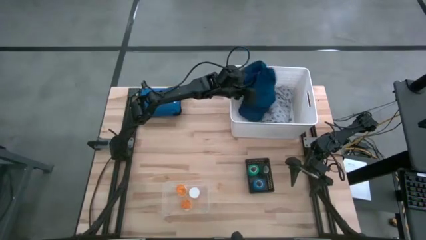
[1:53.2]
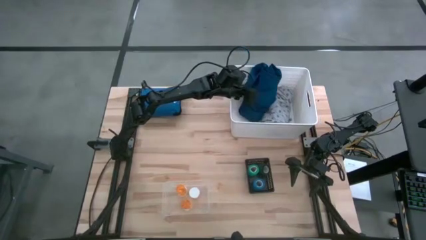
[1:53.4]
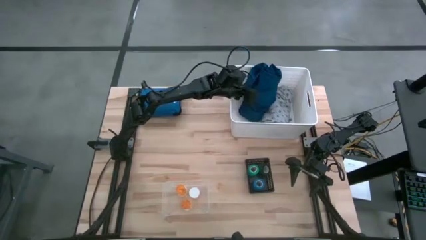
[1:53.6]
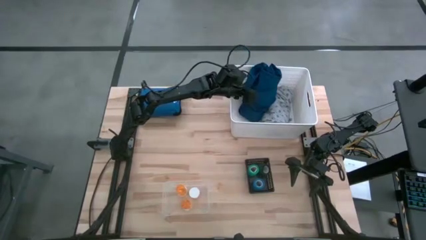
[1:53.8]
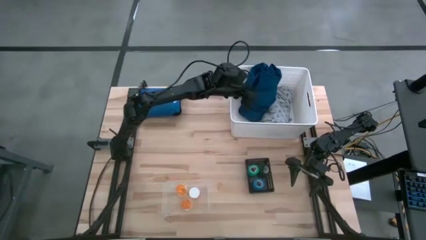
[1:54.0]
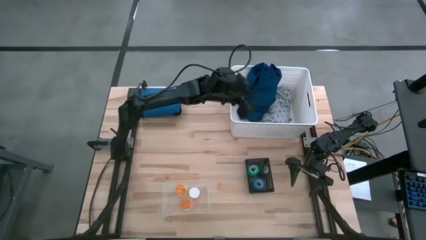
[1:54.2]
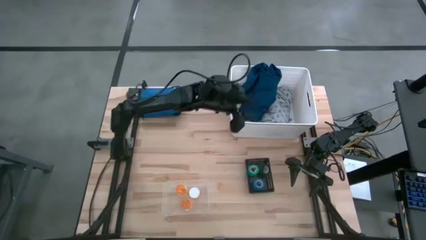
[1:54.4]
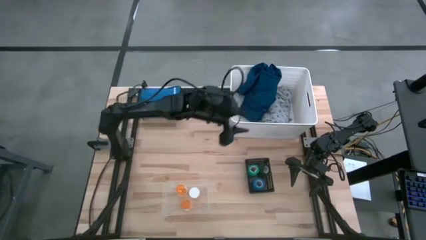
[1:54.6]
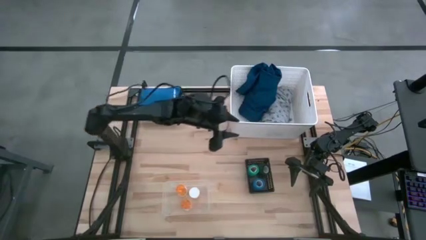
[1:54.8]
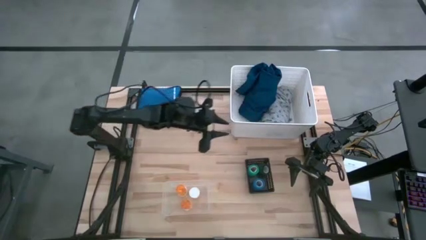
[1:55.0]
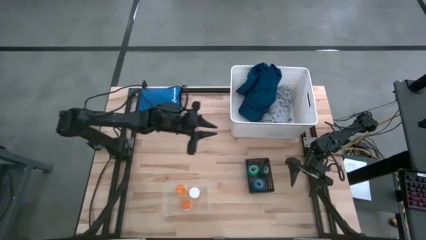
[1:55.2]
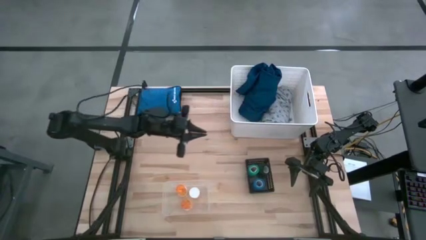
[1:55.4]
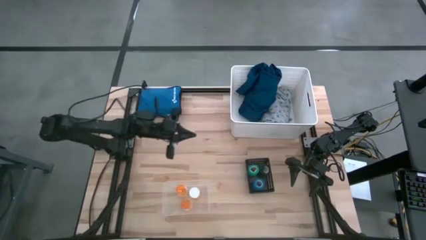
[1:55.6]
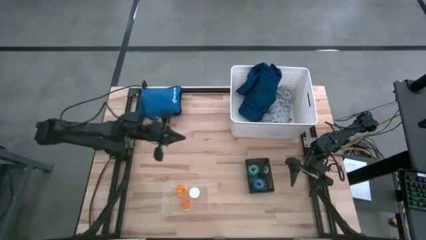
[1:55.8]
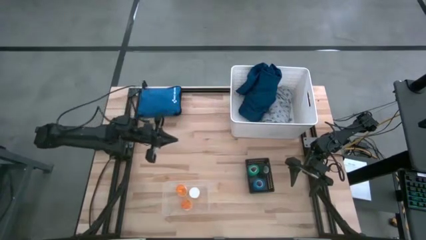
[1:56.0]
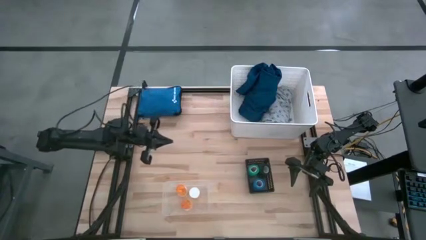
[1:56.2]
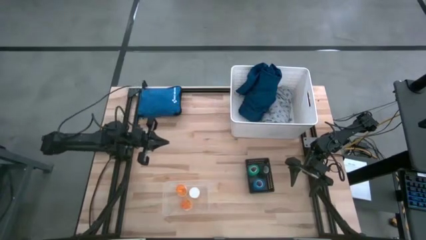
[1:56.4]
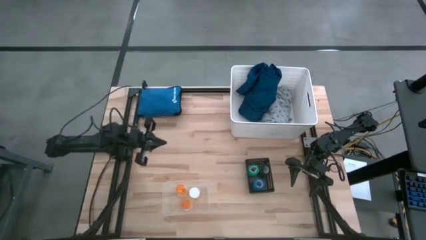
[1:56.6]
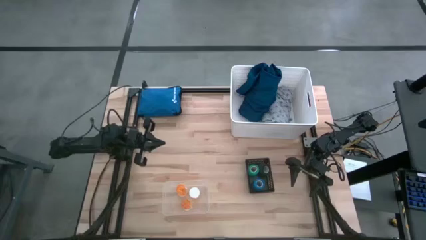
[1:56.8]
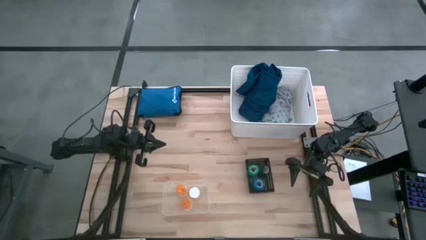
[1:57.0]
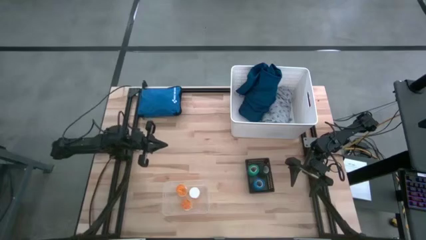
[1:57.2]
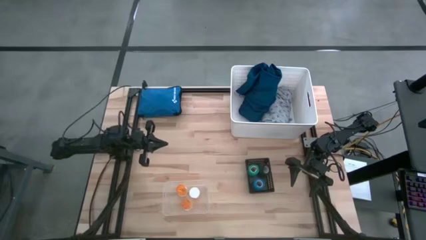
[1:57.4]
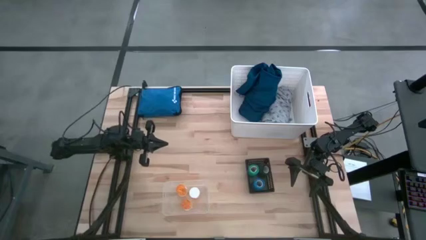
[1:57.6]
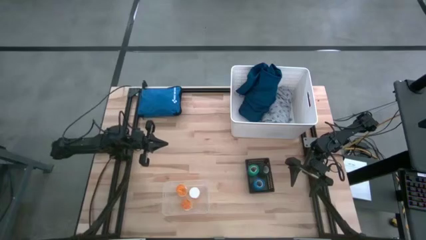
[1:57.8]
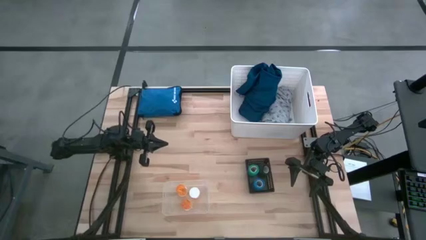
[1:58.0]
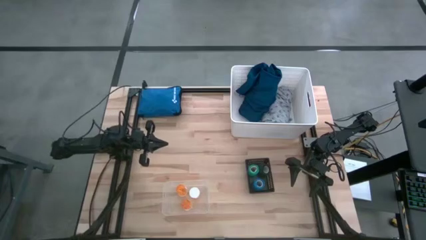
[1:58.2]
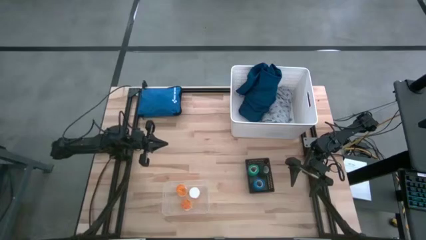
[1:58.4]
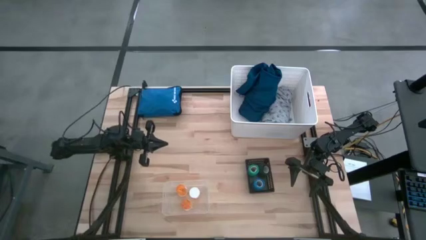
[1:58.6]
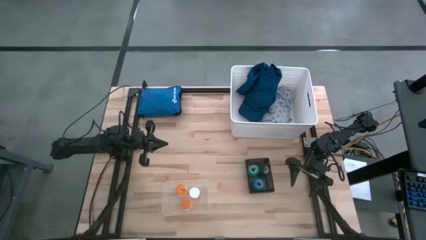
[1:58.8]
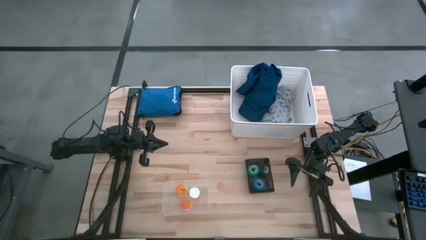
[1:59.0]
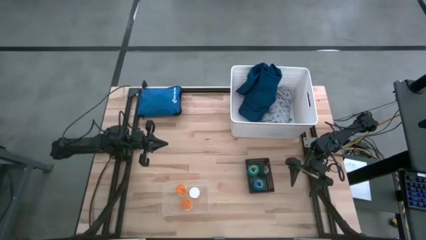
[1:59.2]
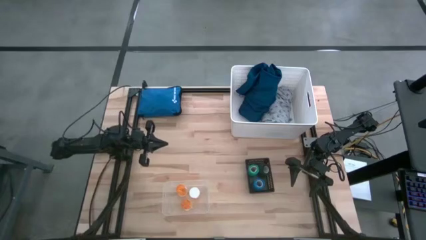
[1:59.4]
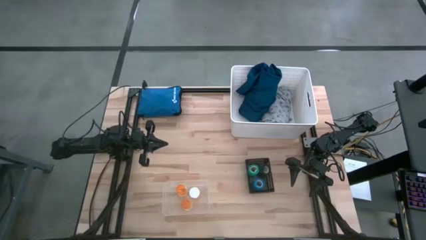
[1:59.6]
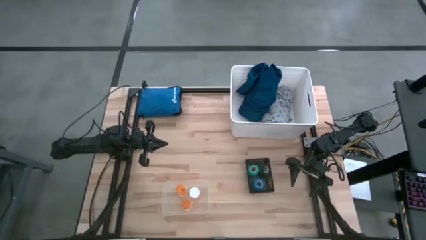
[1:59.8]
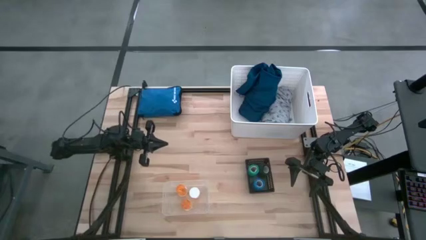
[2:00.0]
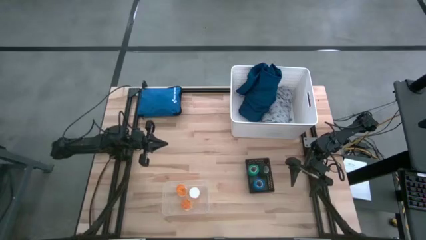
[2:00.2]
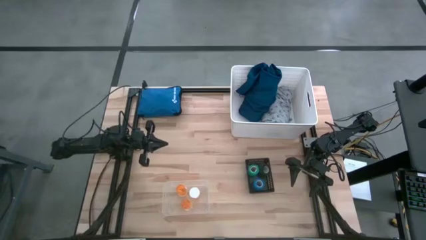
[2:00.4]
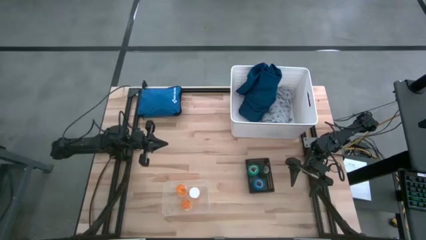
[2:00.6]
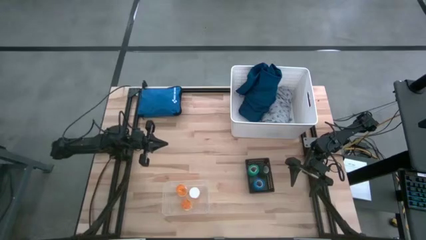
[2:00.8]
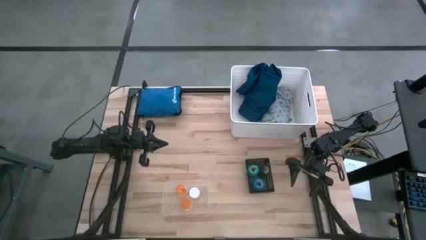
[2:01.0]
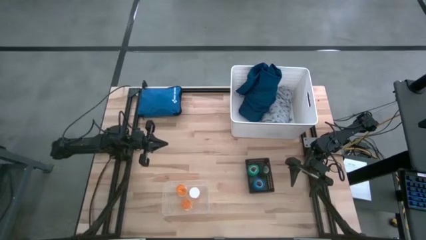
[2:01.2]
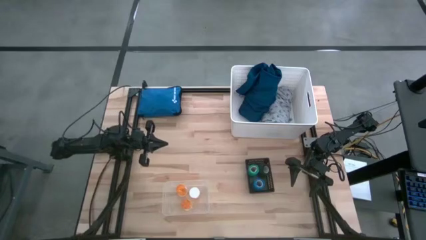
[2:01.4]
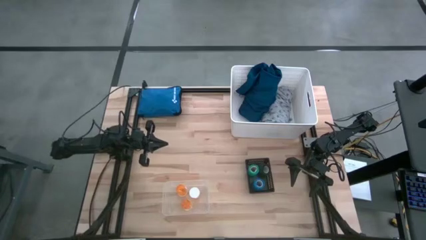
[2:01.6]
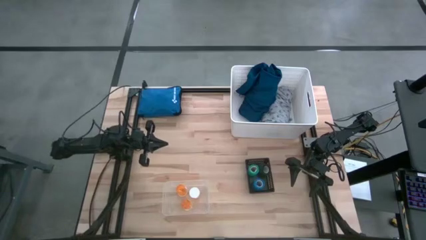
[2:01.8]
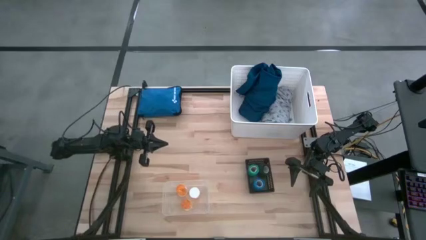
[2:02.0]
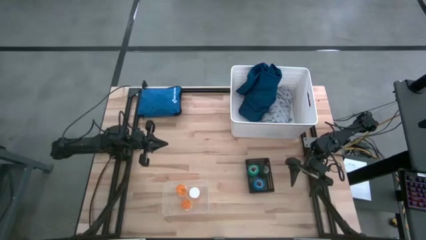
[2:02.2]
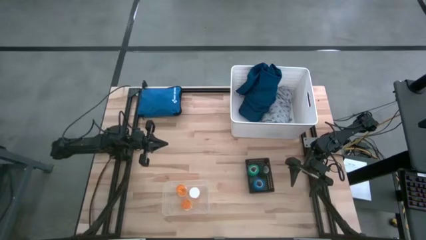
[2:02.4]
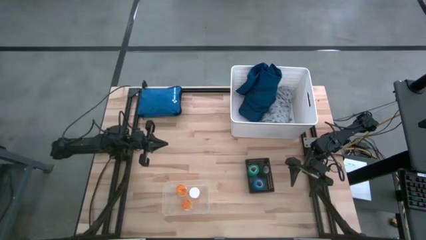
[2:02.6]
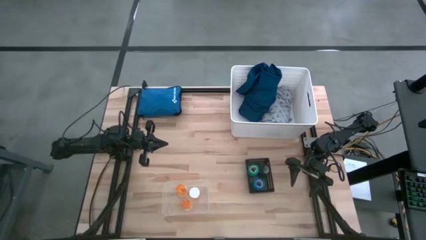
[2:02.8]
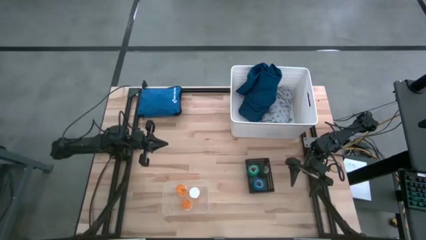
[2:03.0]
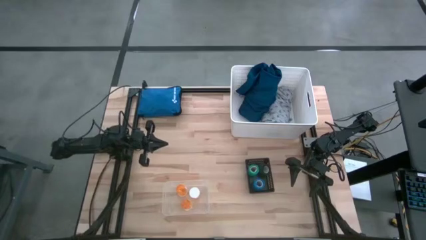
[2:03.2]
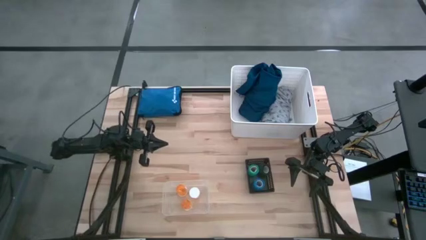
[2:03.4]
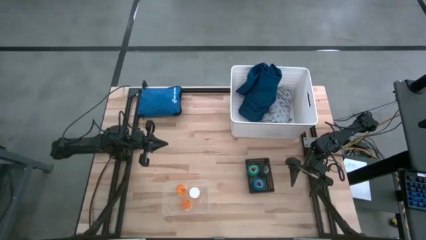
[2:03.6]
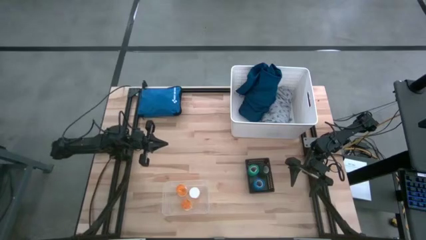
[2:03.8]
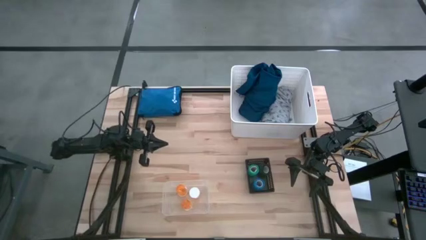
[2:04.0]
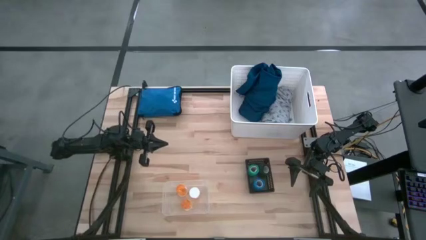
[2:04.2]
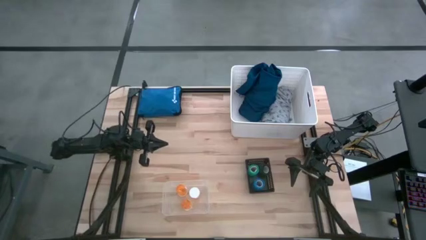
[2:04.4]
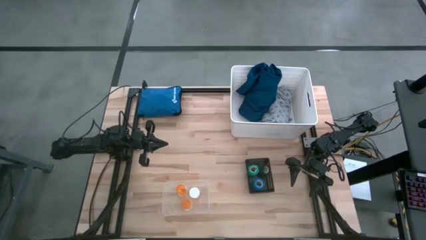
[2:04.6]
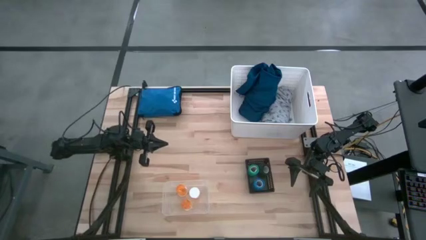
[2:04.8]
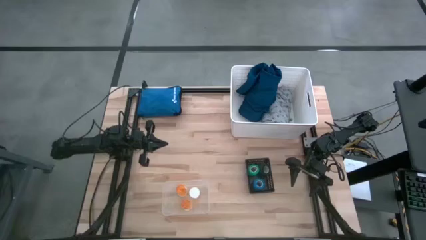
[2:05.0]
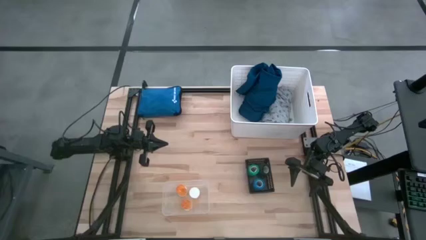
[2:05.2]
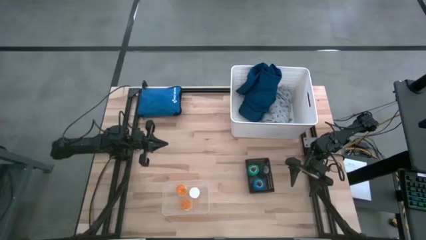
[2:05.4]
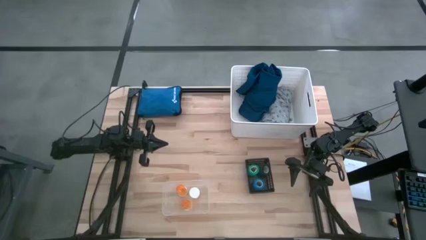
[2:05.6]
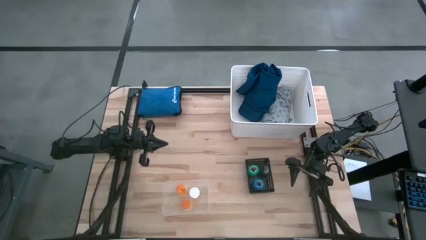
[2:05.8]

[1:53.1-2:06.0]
Task: Pick & place medical supplies in basket/bin
Return to Home Position

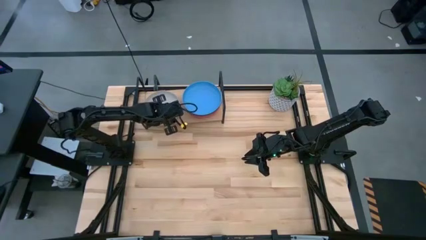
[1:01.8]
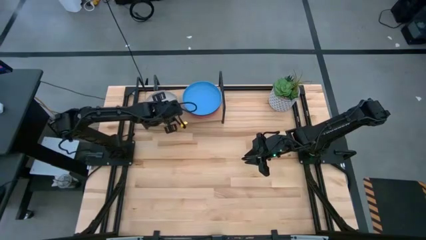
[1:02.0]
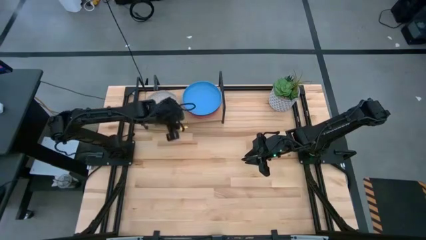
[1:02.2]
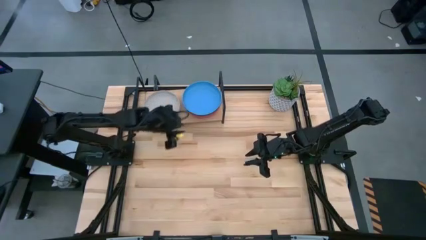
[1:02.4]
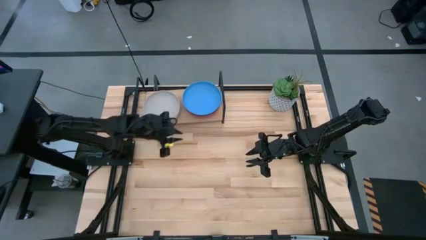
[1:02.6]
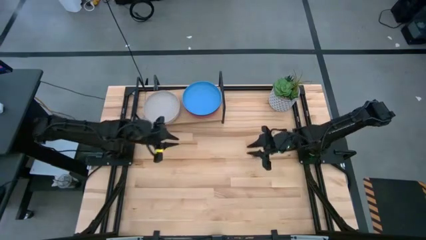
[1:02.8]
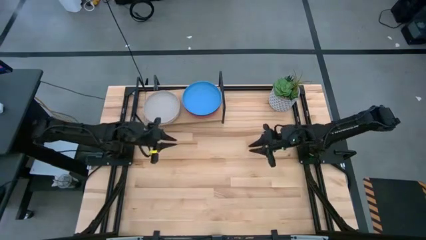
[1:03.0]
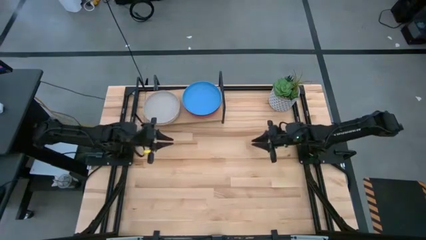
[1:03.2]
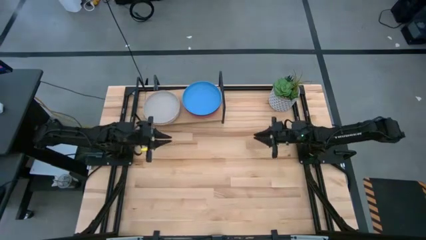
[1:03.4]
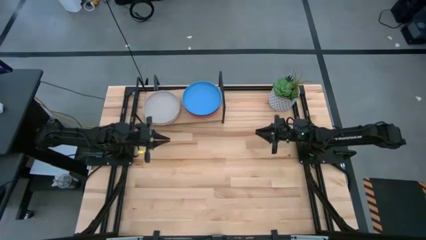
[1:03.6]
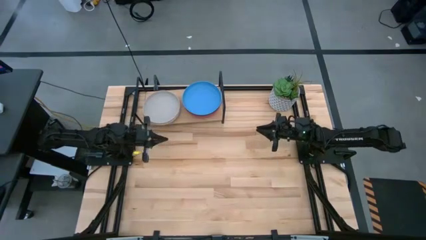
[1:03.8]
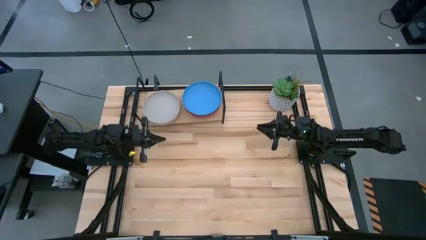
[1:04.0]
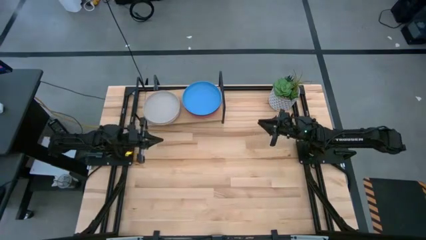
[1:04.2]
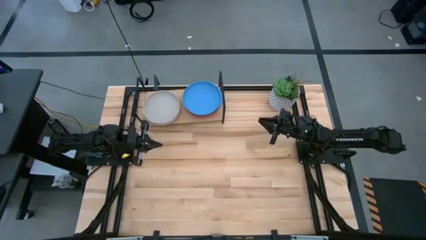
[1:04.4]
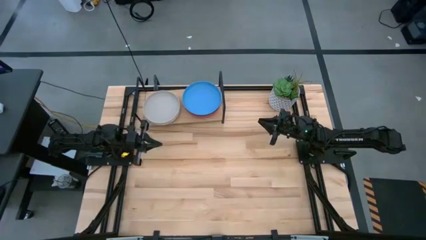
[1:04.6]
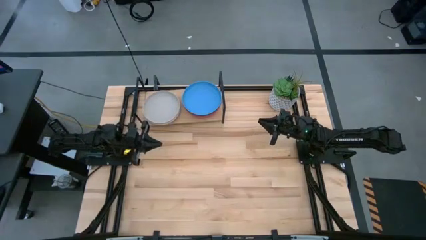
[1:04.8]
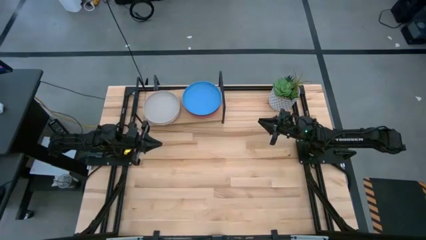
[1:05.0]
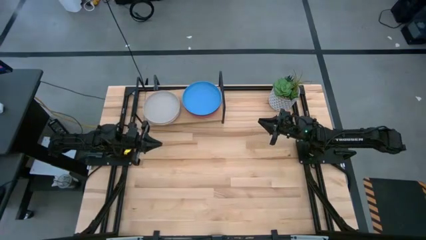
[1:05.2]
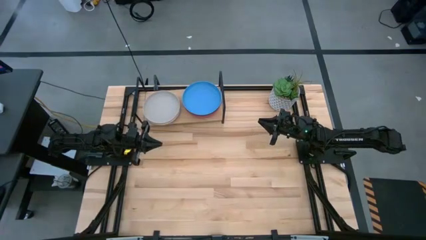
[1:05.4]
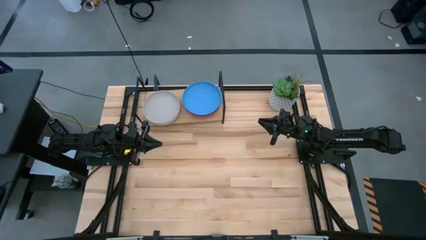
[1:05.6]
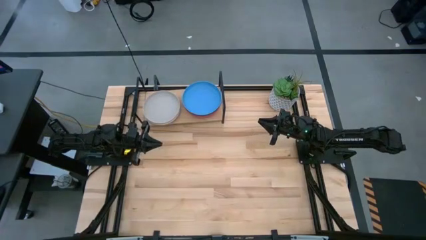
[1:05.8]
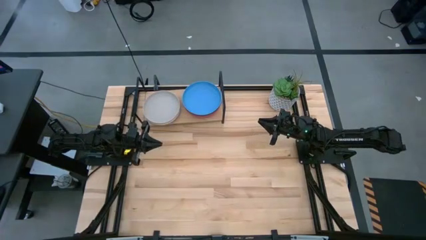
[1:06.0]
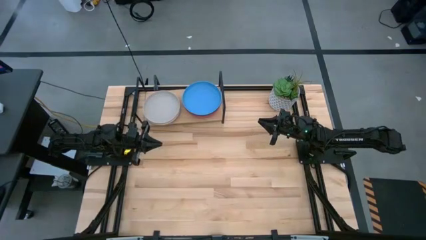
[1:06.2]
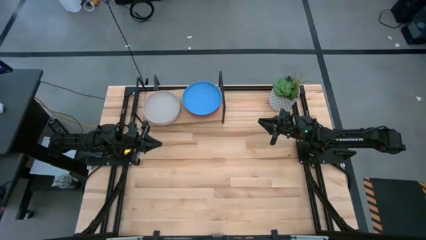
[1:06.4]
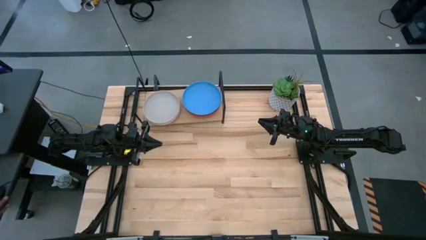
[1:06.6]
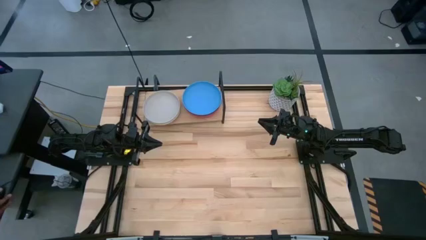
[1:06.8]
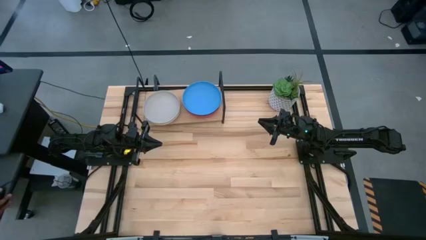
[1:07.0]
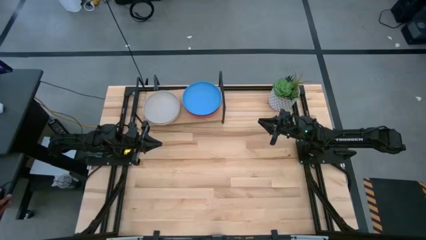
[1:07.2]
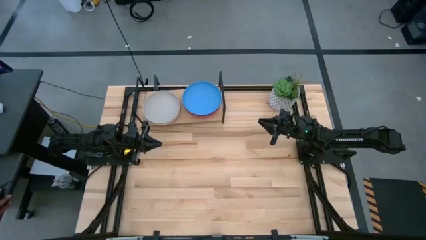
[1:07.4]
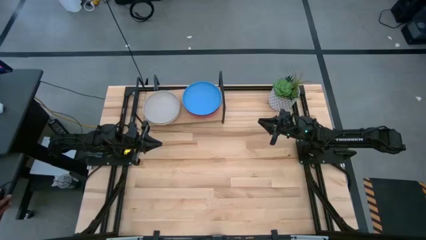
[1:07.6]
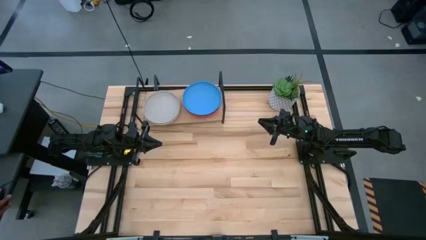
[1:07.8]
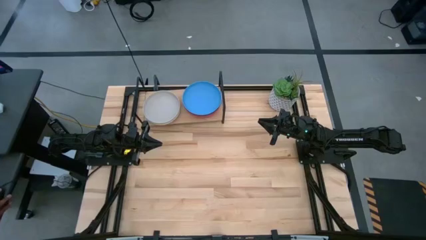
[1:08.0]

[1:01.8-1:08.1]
Task: Place and stack plates onto a shelf
Return to Home Position
